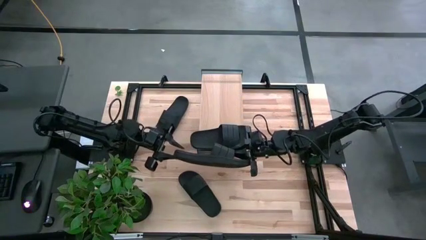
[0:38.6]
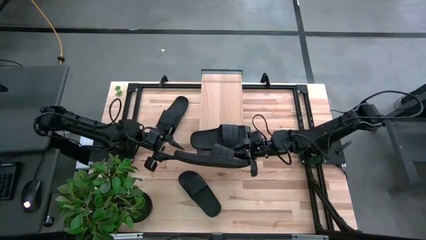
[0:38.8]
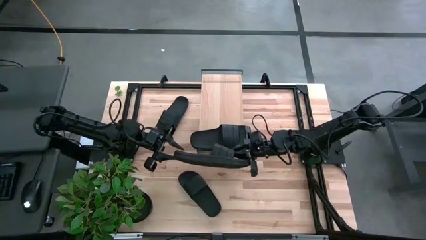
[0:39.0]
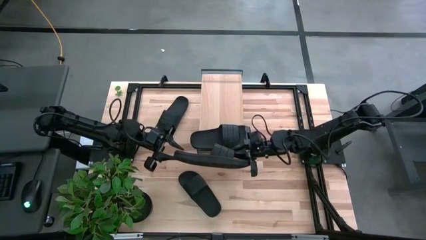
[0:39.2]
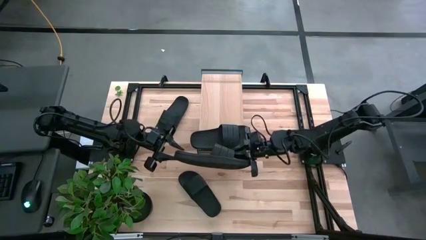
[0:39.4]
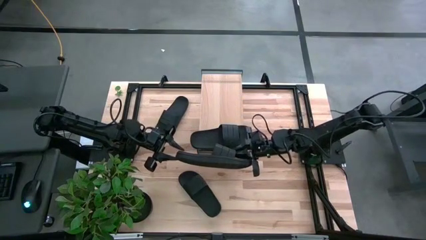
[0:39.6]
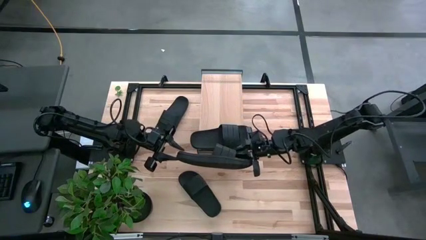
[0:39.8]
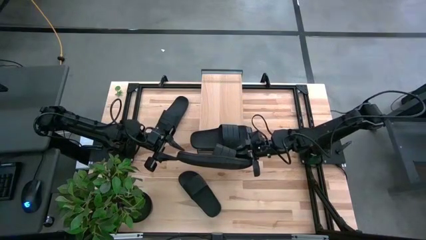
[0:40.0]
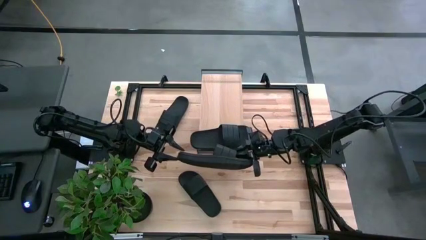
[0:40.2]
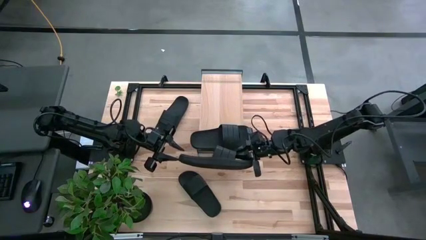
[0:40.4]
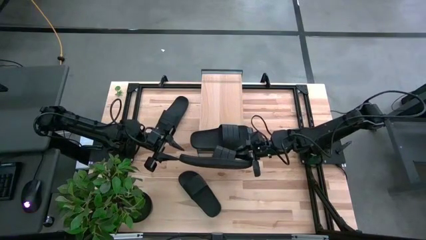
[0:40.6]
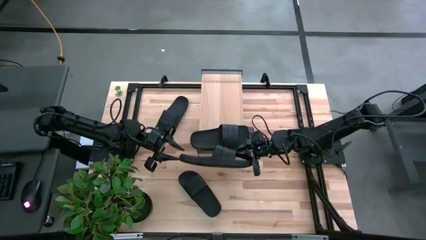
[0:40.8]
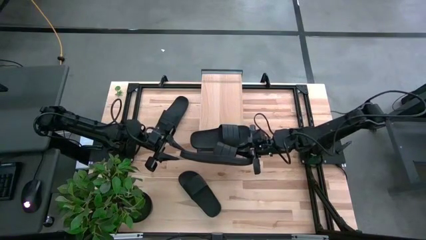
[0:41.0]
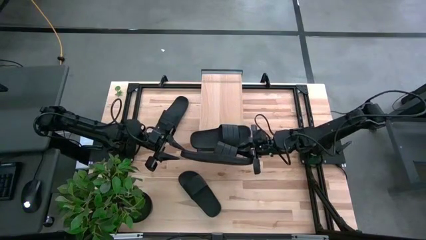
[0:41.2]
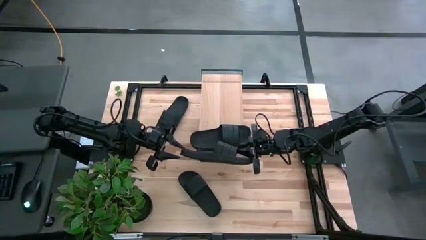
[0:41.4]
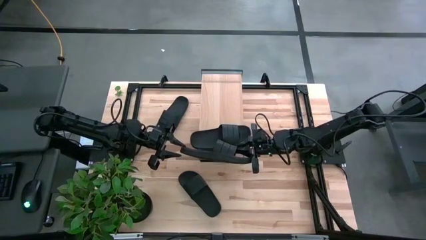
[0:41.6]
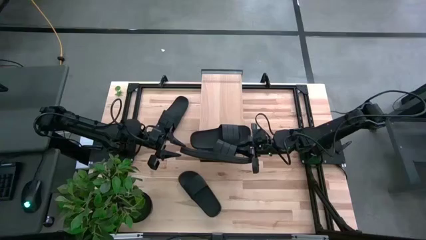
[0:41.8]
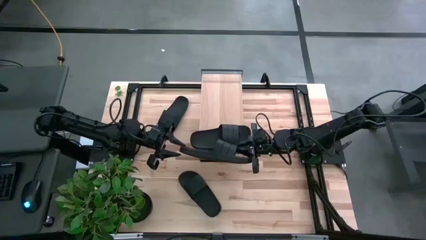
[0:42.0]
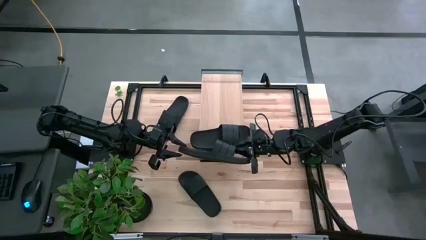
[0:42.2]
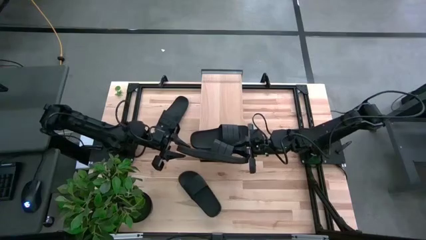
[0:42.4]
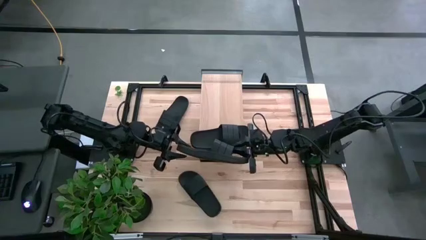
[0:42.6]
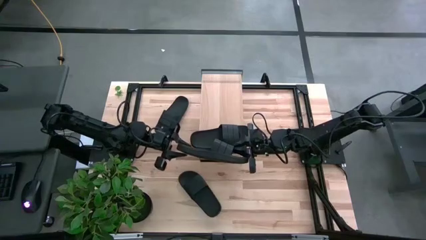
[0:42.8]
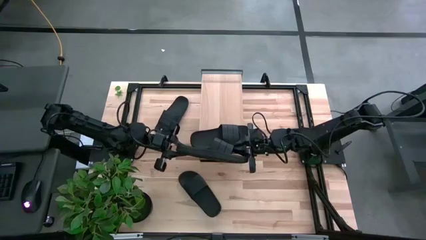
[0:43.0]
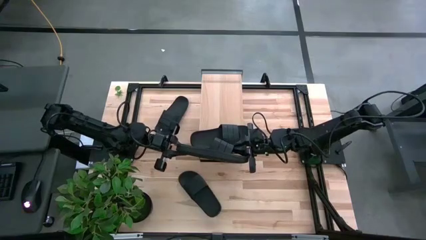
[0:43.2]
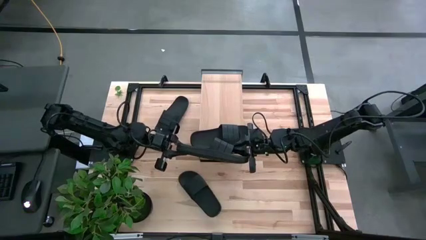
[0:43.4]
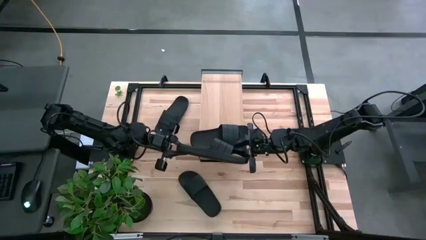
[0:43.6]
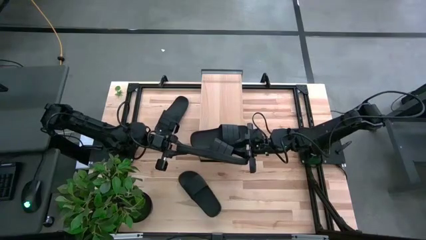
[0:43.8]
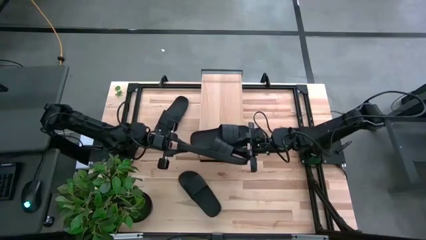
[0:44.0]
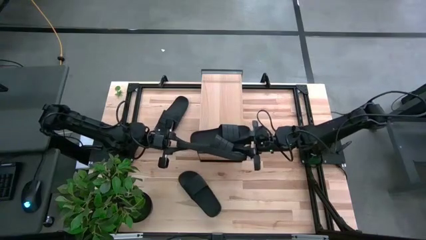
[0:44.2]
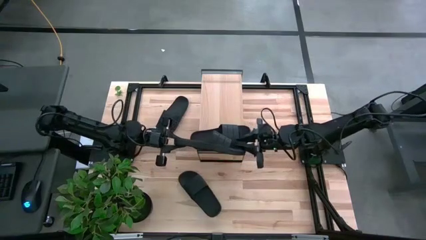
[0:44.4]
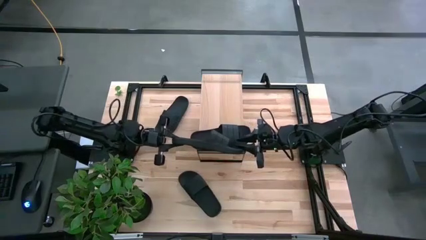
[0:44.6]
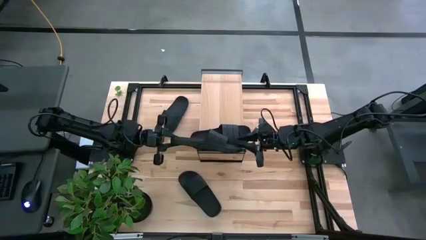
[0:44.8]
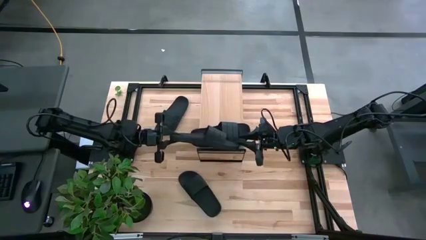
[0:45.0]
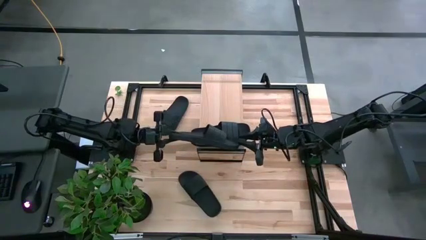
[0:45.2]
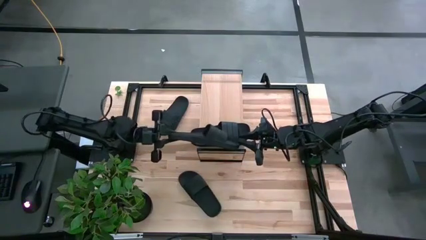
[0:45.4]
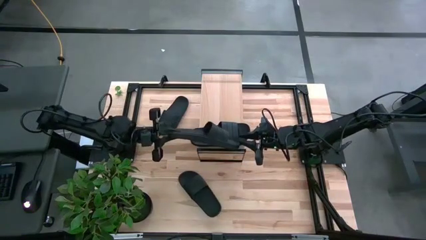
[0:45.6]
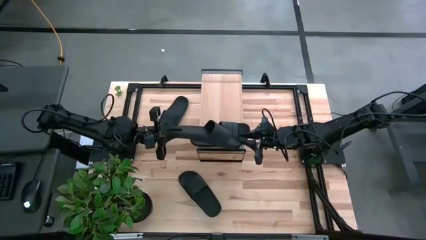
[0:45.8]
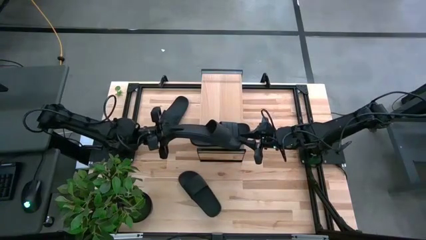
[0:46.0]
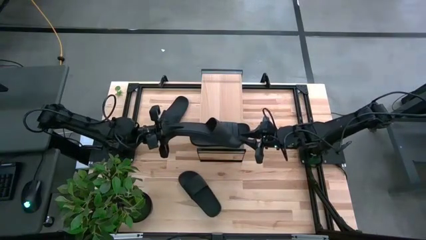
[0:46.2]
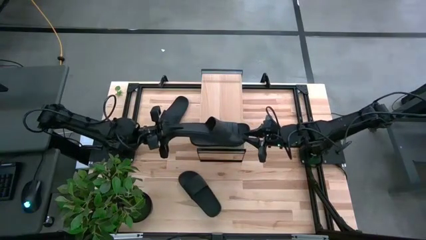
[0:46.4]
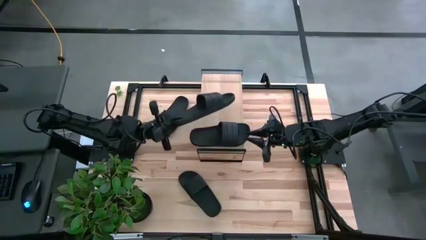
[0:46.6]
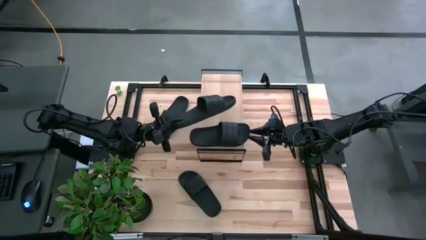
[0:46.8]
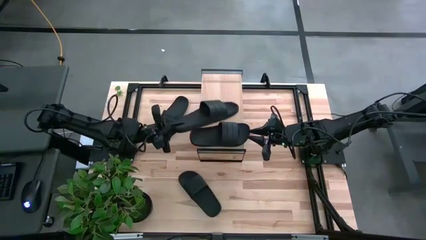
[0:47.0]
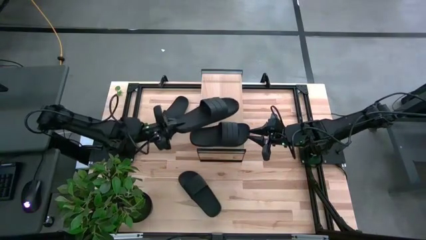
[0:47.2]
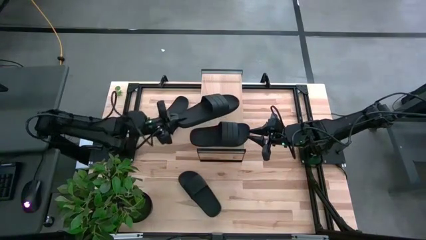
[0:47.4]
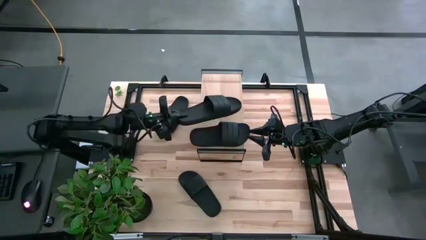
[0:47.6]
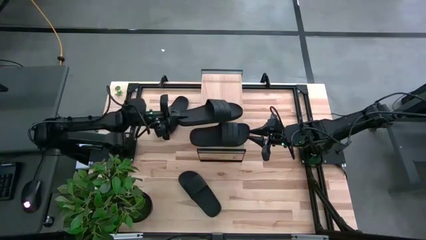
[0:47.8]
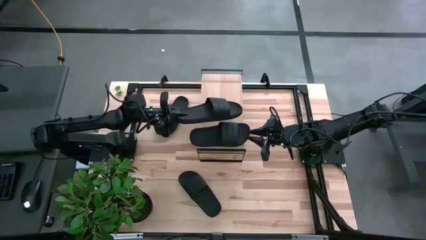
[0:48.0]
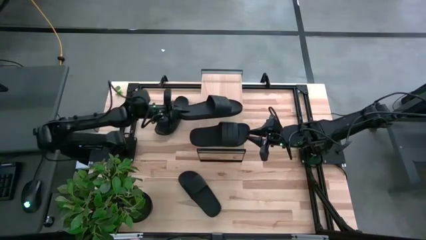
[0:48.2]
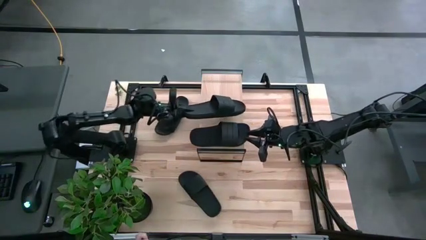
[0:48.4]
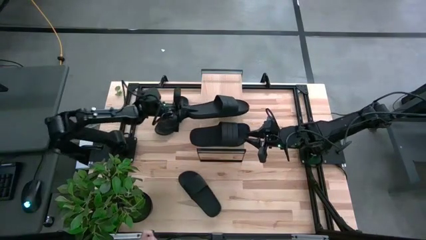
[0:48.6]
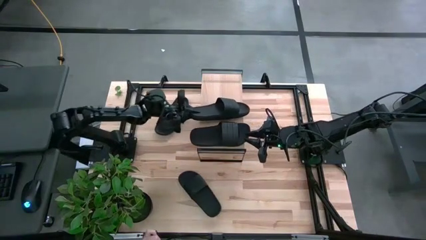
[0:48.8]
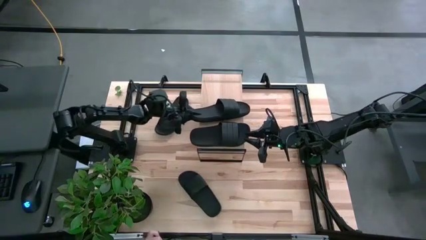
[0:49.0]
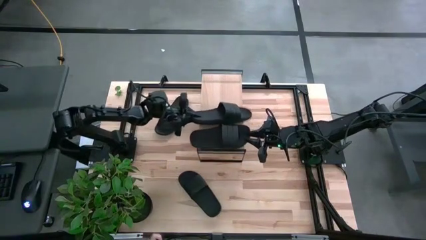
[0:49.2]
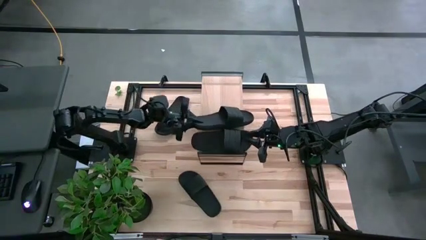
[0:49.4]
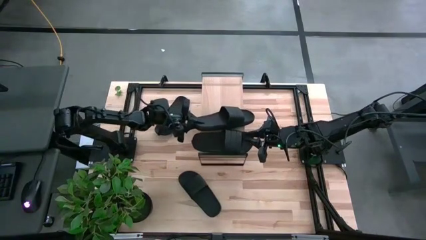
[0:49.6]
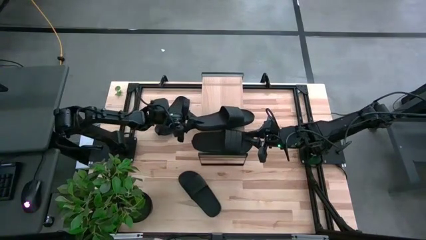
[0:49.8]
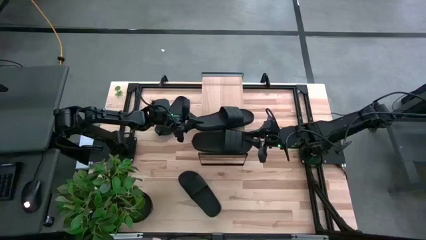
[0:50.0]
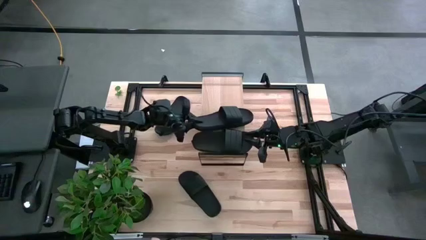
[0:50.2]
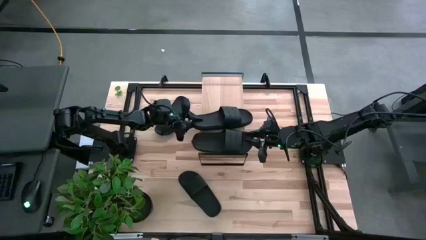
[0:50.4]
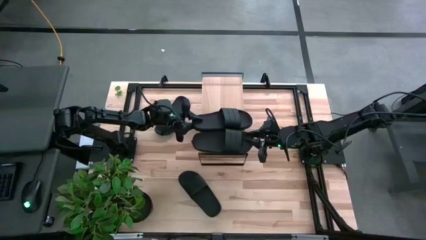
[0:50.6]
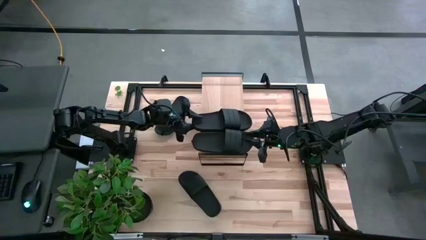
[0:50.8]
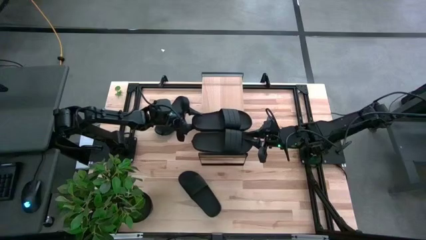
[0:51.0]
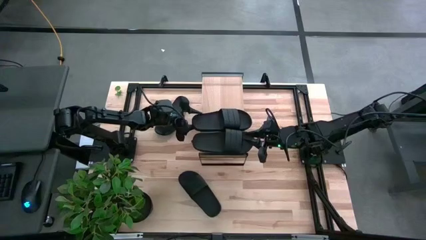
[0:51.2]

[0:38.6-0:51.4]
Task: Pick and place slides into the shelf
Put the black slipper on the shelf

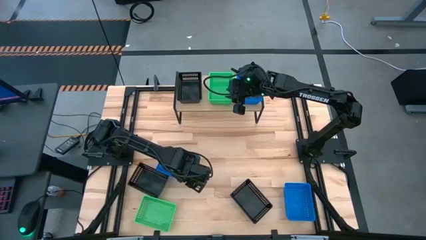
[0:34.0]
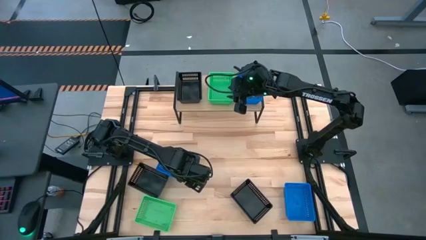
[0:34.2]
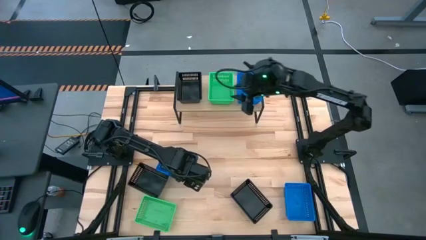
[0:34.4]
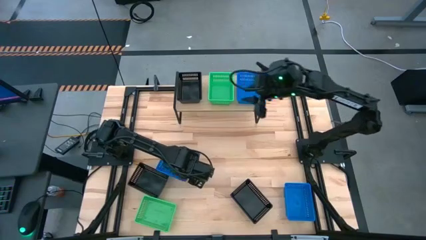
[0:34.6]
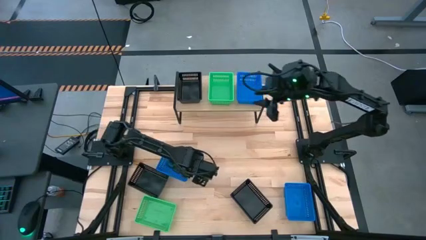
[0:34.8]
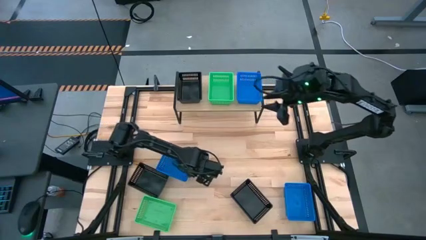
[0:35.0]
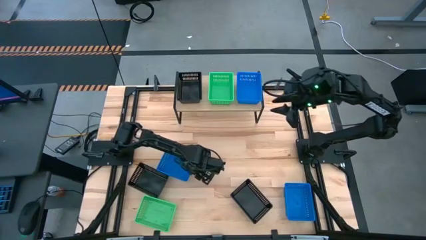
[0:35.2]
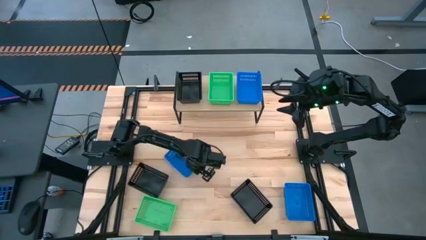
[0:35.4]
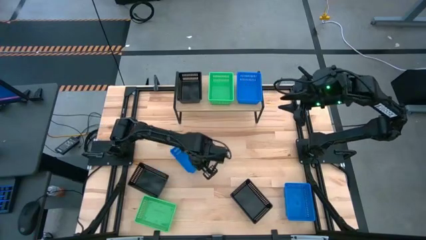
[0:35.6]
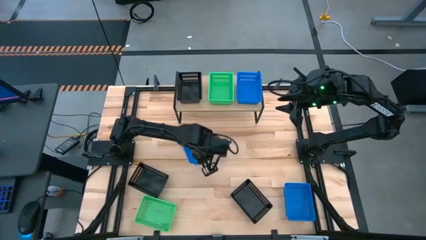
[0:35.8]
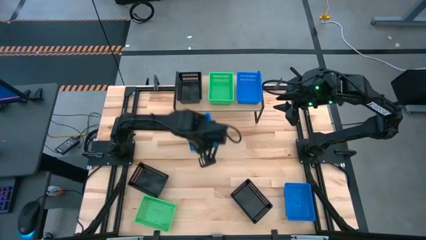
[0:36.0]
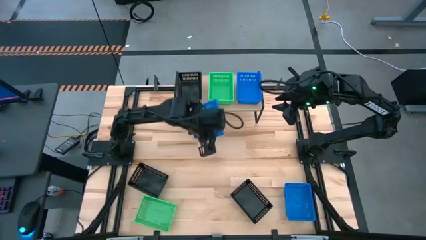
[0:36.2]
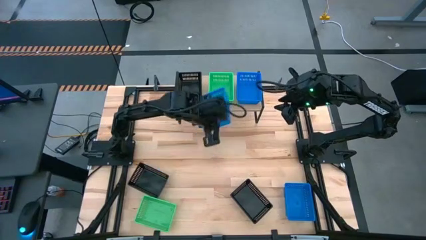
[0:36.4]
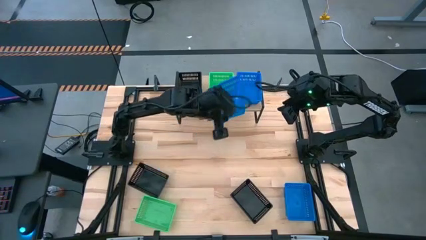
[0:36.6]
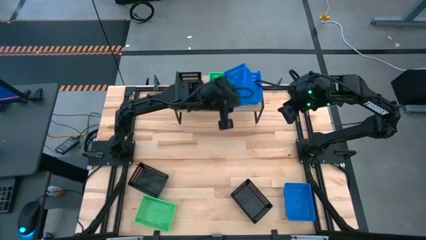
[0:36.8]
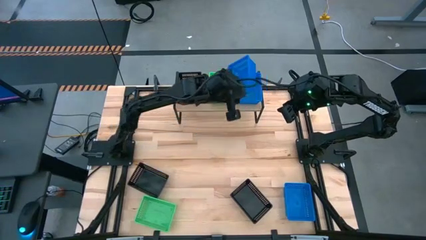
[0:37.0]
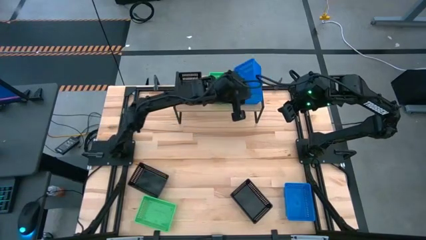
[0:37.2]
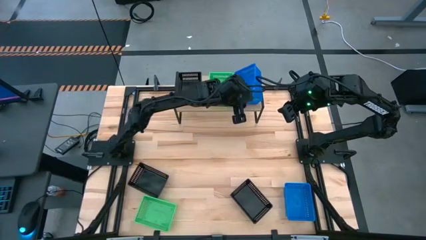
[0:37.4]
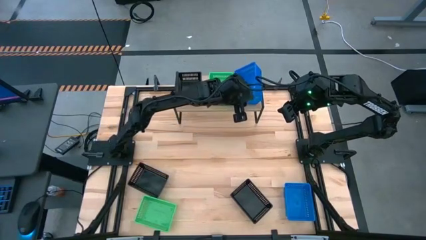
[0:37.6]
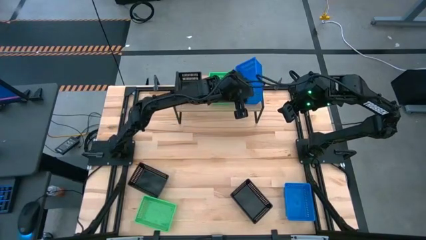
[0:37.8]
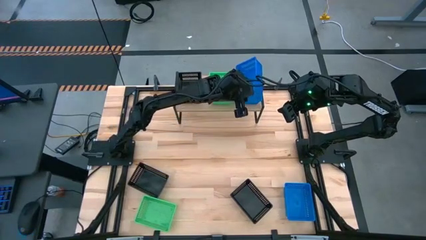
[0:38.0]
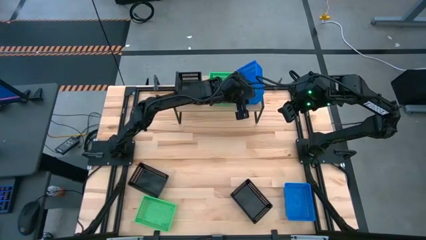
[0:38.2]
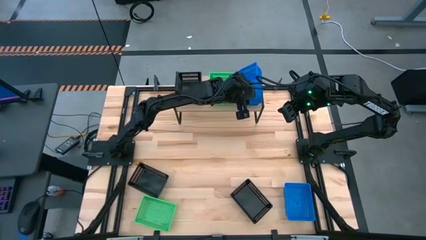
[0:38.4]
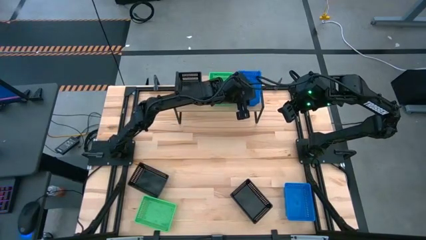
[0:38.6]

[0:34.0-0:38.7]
Task: Stack baskets on shelf by color
Stack the left blue basket on top of the other blue basket on the shelf
